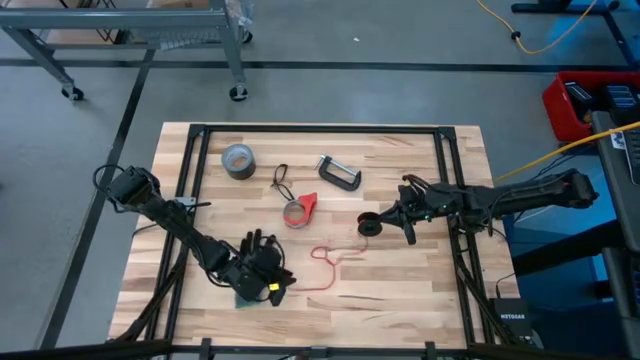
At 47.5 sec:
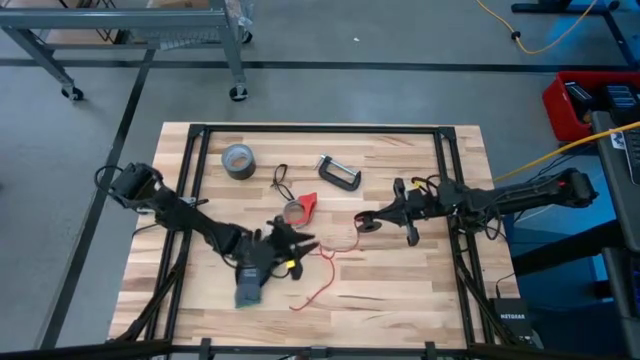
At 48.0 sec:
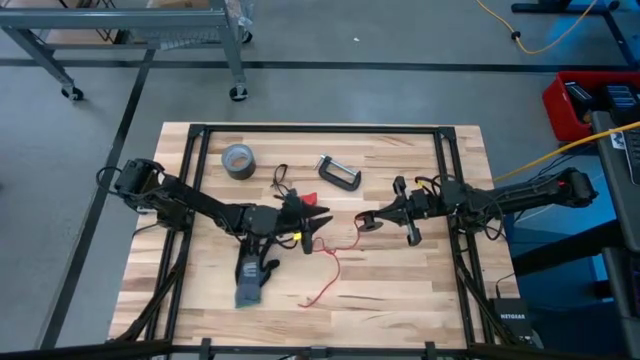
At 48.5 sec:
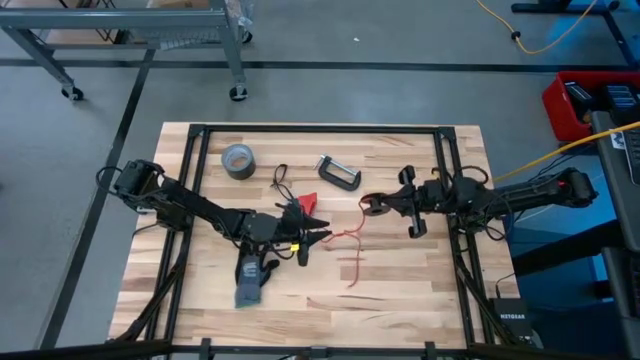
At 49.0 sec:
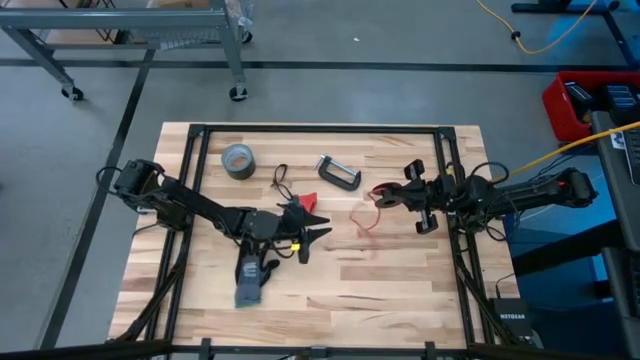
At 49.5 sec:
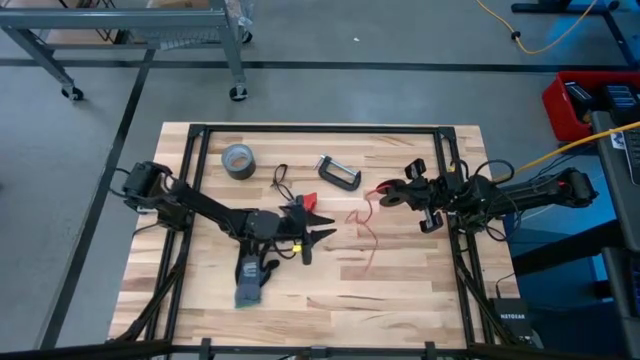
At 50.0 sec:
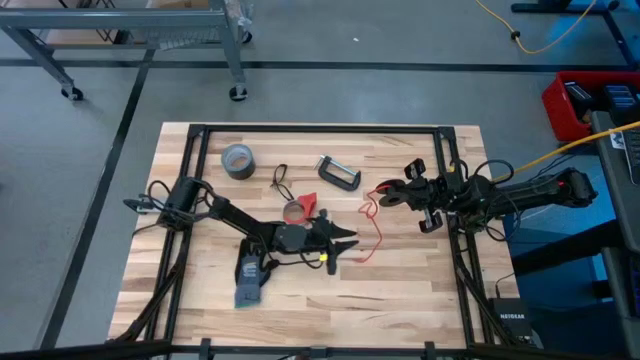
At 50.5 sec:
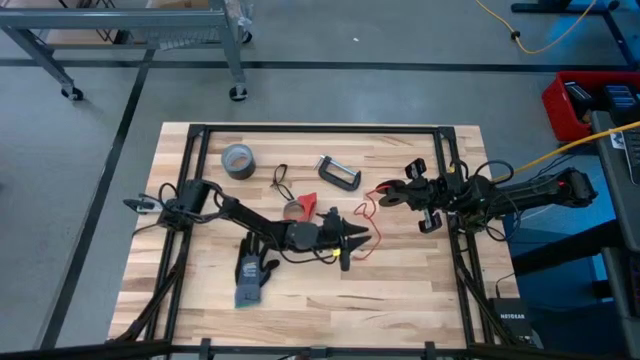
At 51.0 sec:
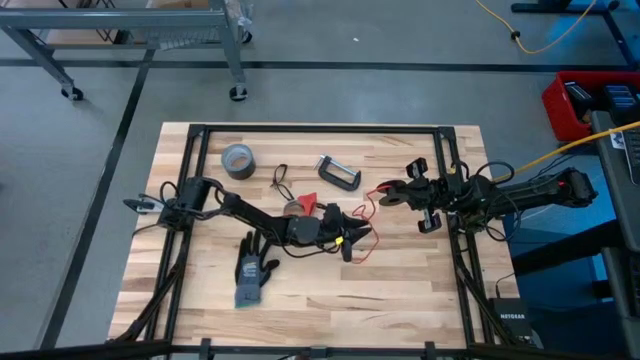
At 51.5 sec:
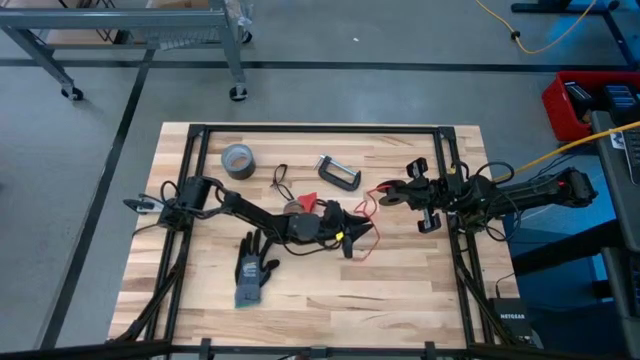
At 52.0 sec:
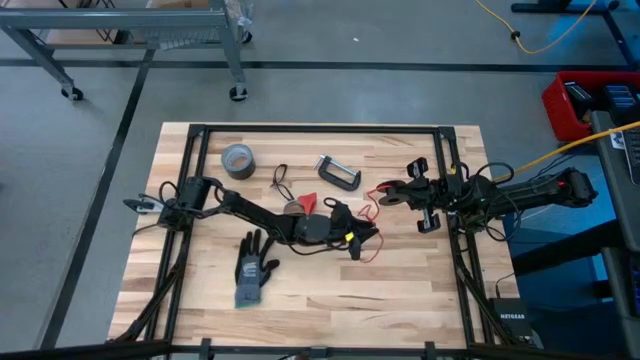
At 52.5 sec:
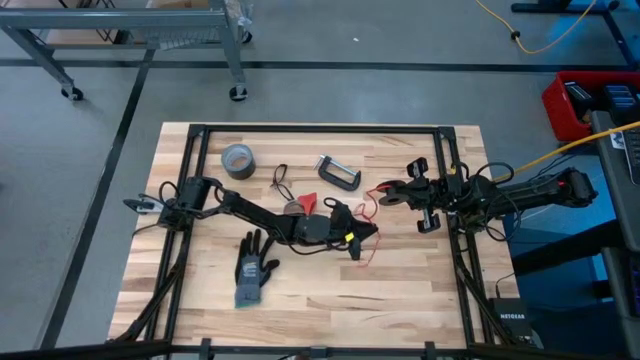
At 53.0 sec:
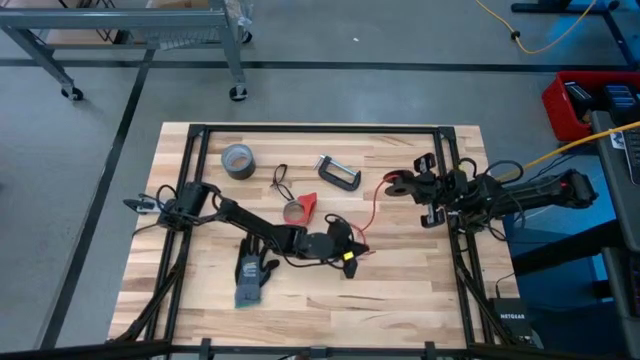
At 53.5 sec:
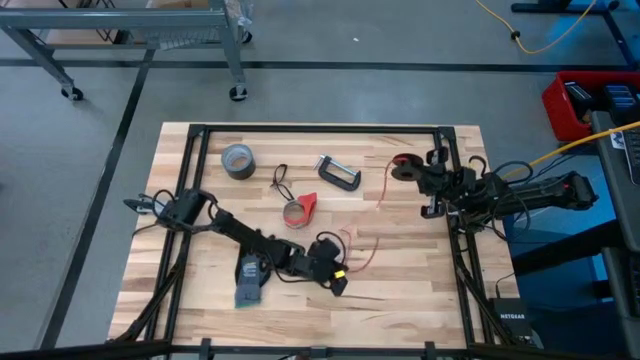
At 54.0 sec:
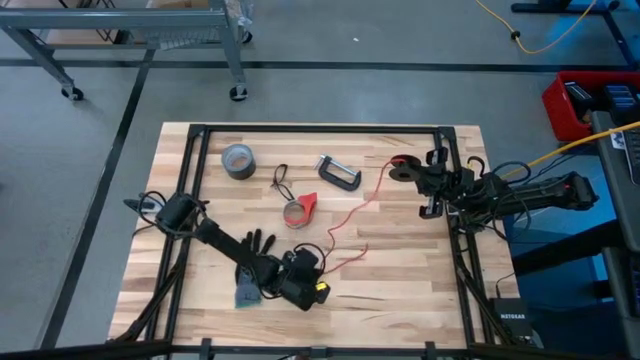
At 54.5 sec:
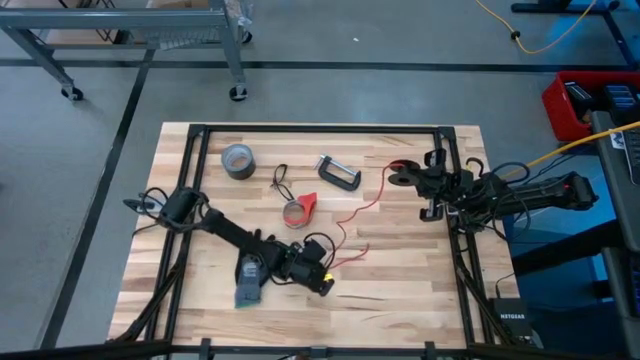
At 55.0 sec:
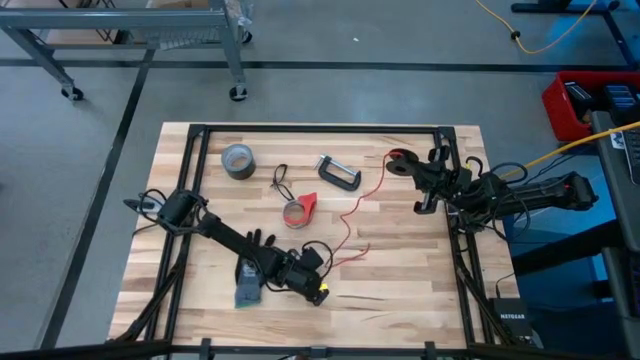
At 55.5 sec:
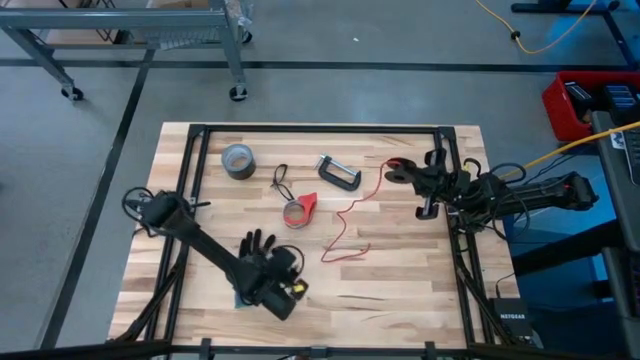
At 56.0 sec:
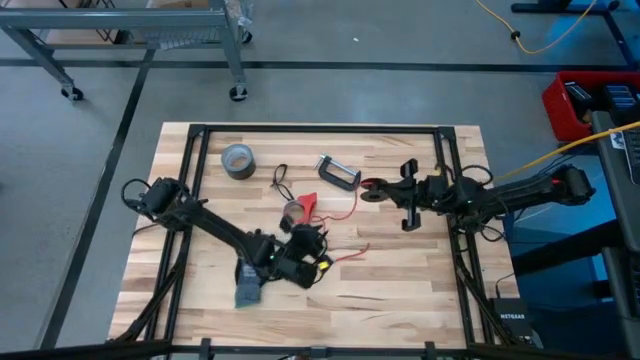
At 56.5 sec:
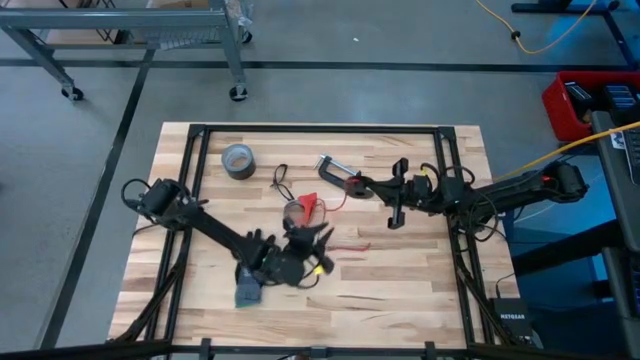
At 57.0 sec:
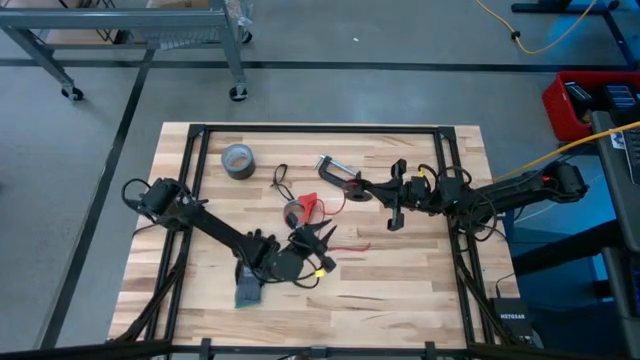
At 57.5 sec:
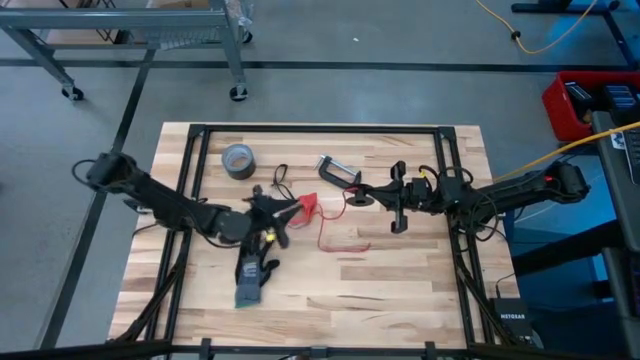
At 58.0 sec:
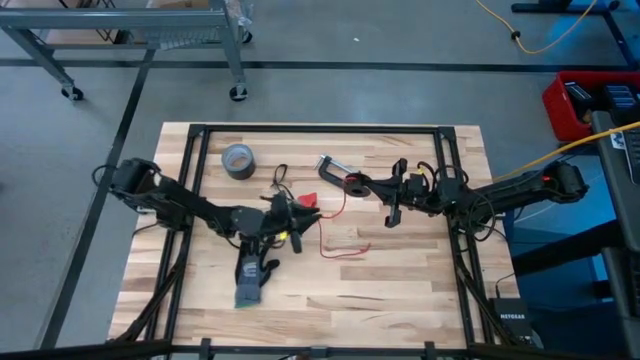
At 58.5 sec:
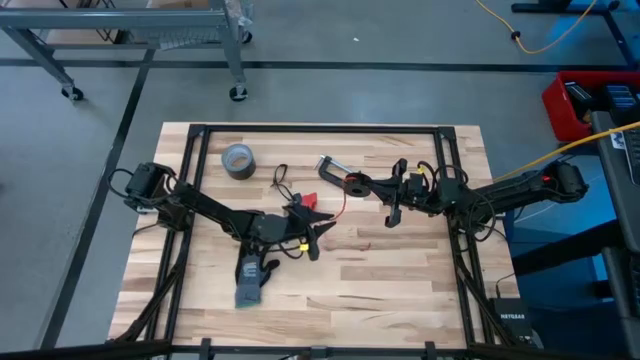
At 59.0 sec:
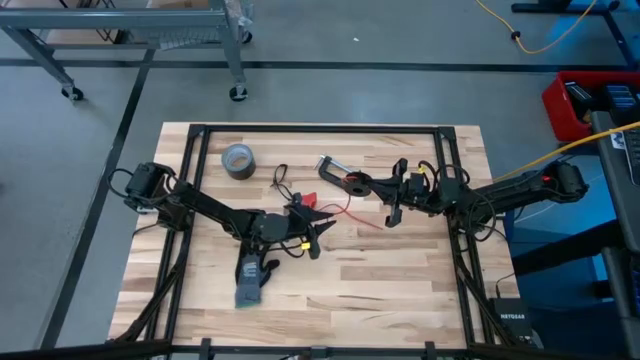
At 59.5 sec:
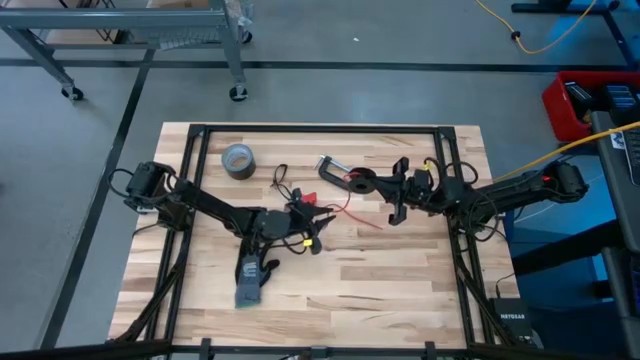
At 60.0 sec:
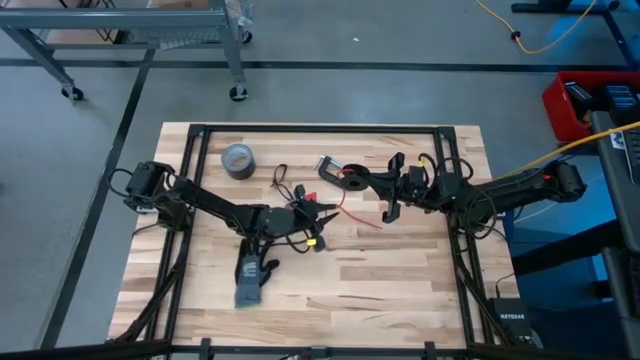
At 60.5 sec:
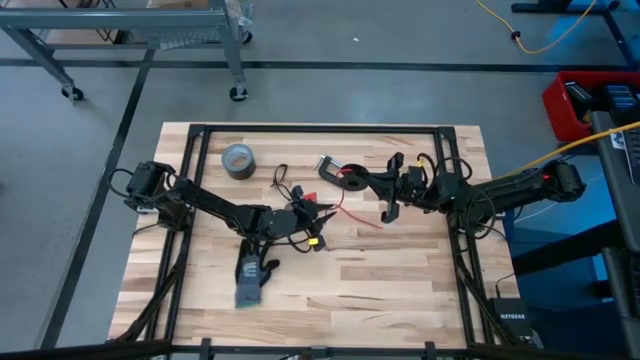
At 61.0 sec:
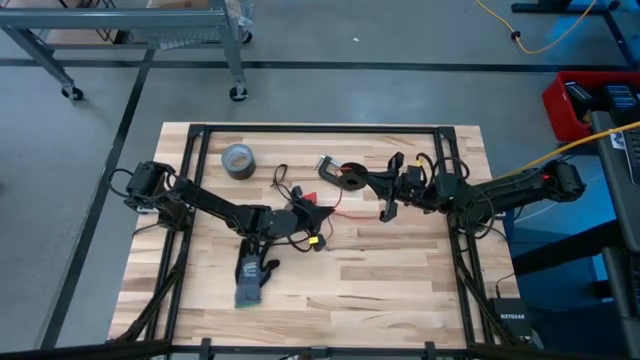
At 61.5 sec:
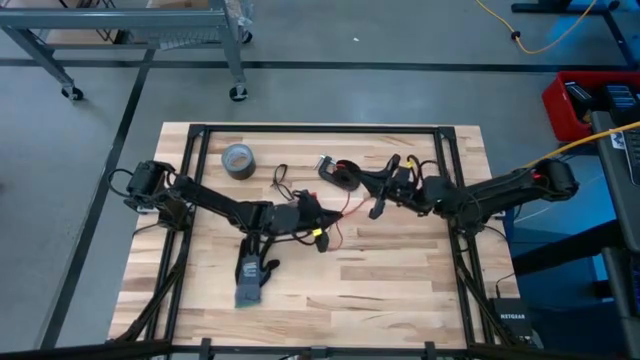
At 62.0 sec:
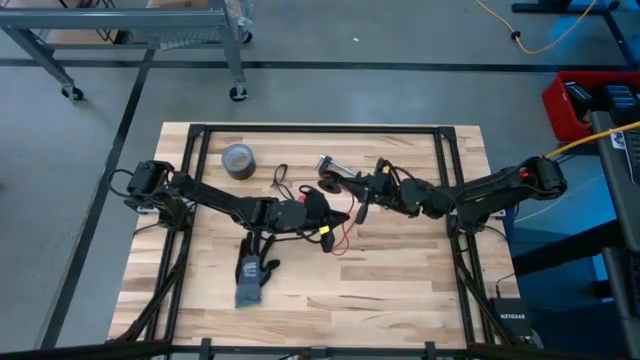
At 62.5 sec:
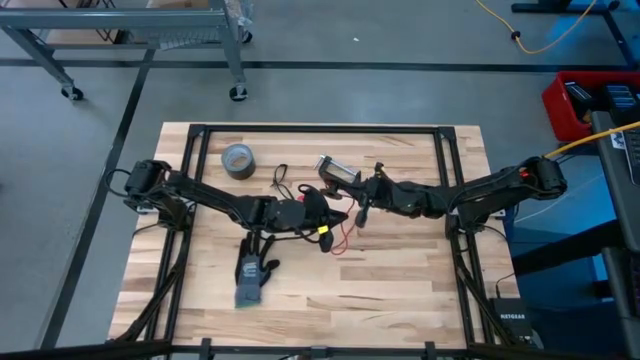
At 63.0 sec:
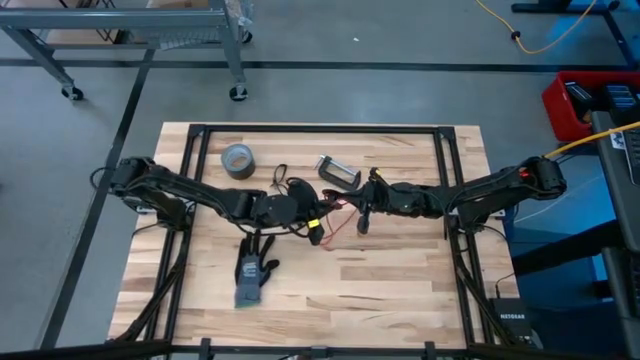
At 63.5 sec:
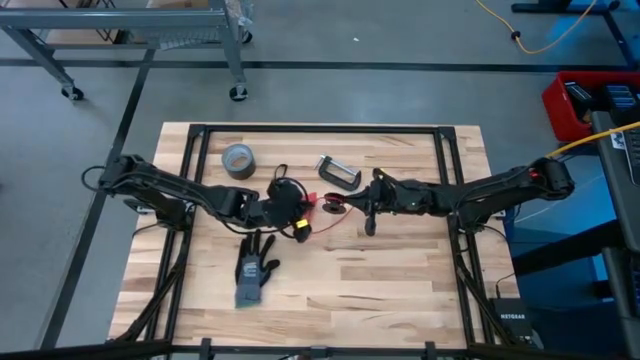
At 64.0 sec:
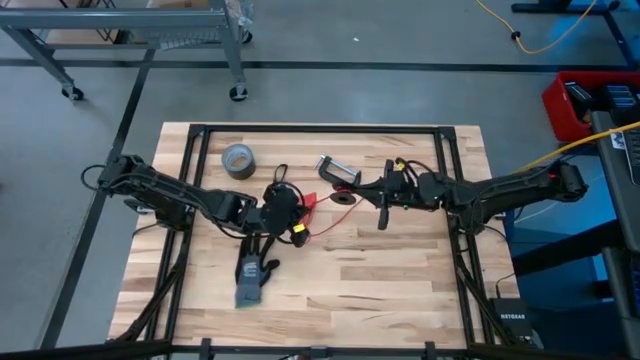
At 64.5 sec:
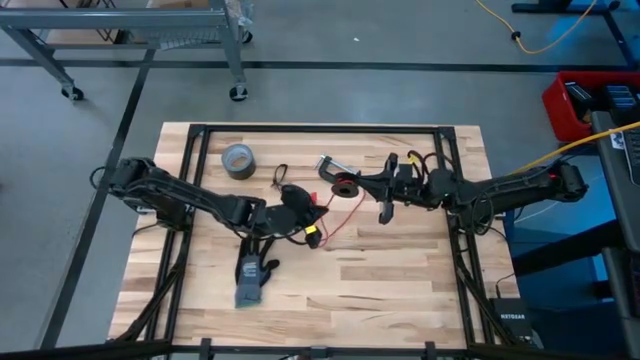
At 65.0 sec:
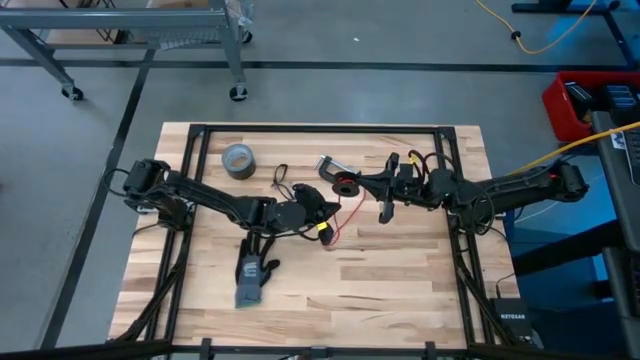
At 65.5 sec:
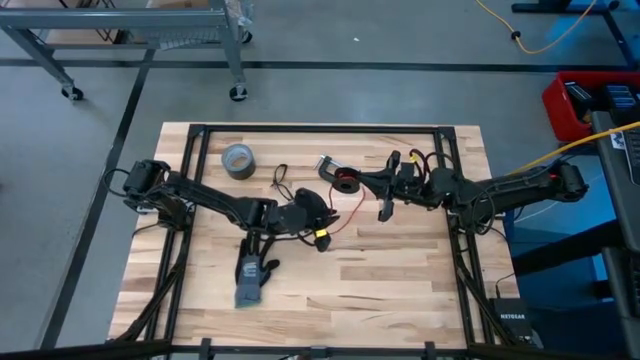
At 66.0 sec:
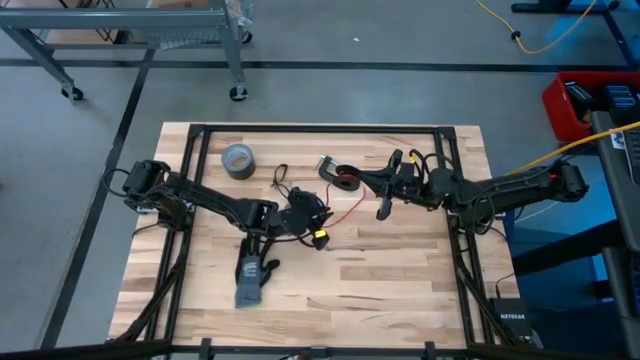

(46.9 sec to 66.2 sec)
Task: Coil cords
Coil the red wire onto the spool
